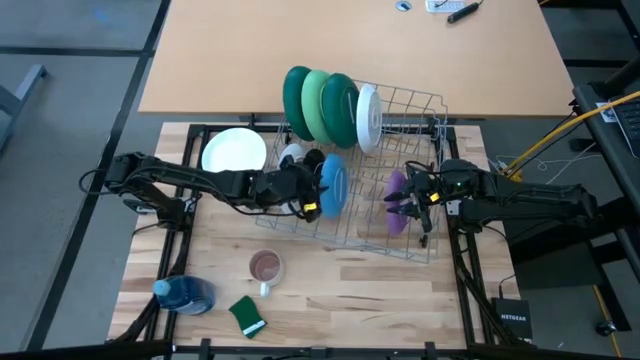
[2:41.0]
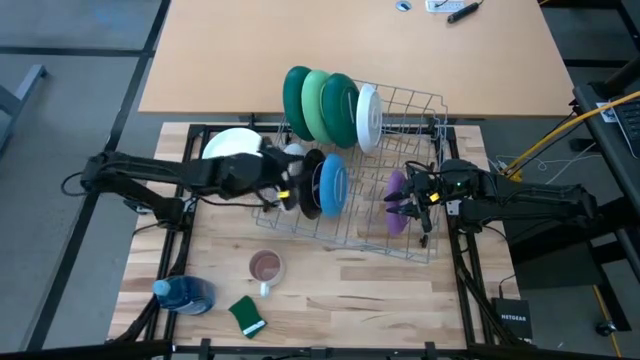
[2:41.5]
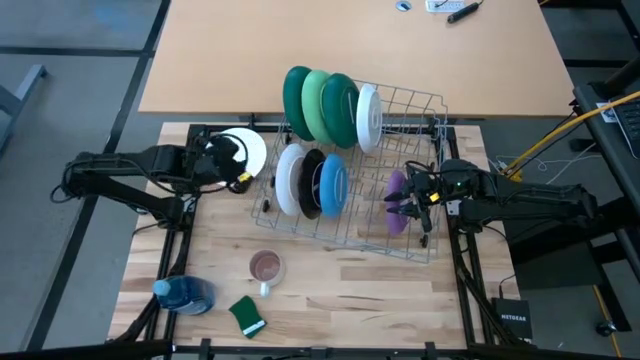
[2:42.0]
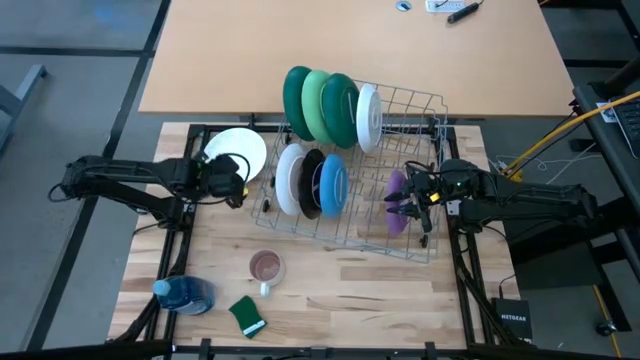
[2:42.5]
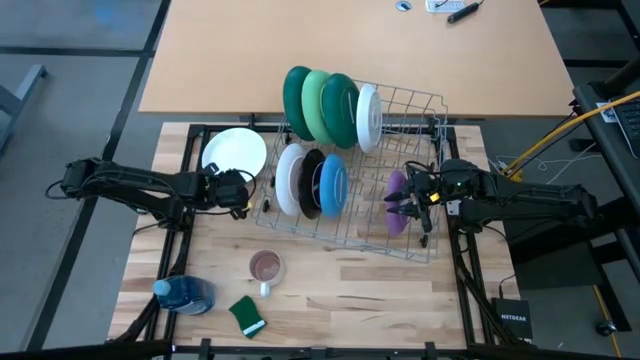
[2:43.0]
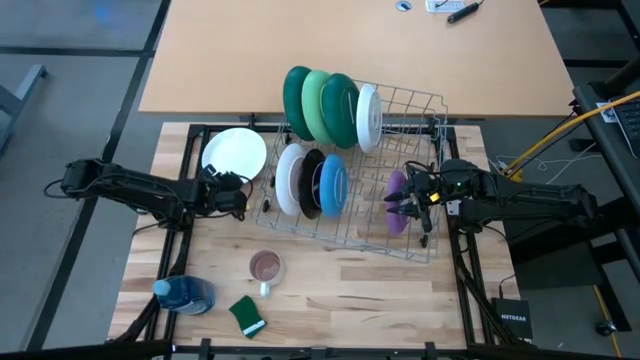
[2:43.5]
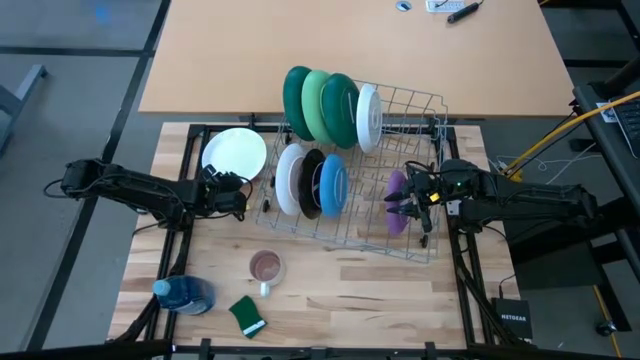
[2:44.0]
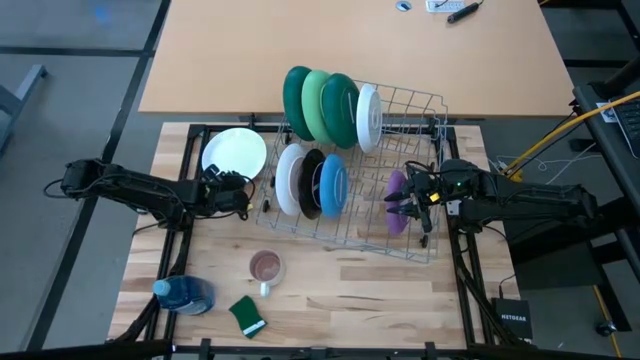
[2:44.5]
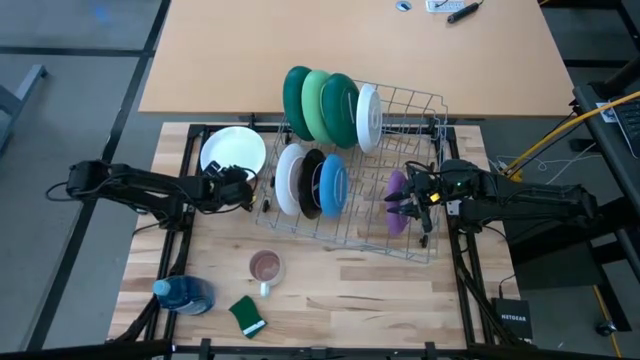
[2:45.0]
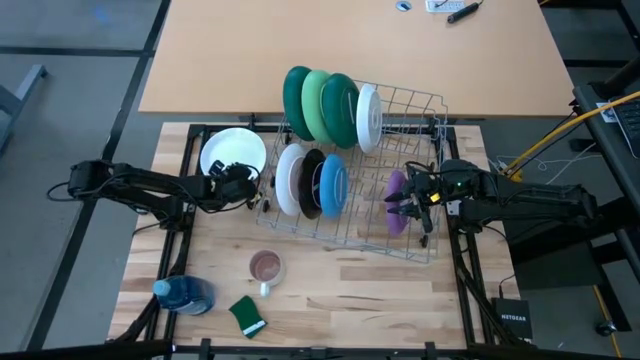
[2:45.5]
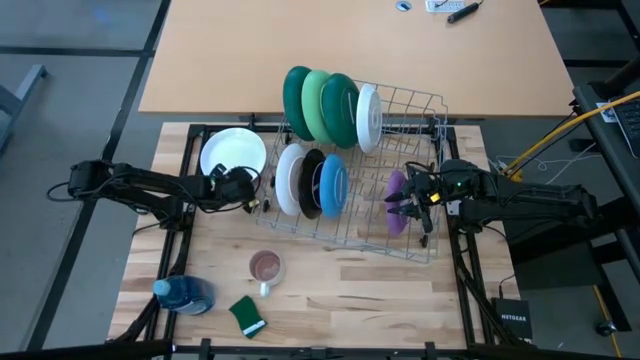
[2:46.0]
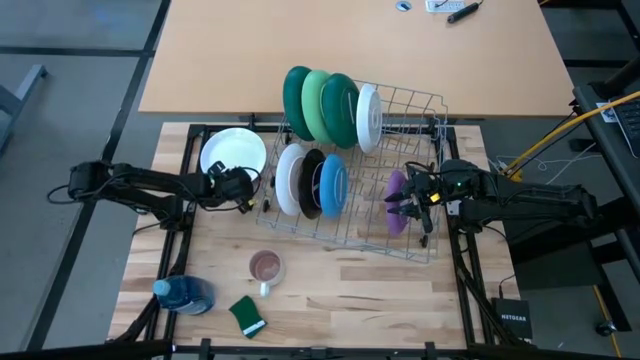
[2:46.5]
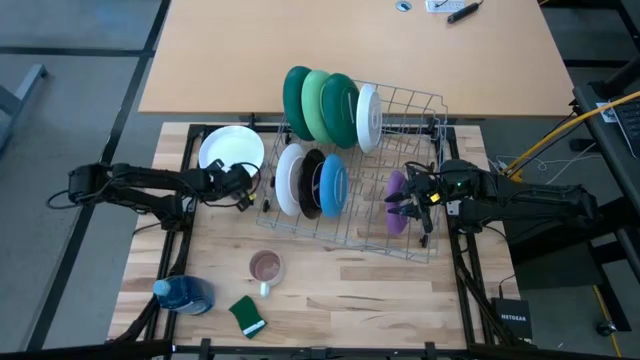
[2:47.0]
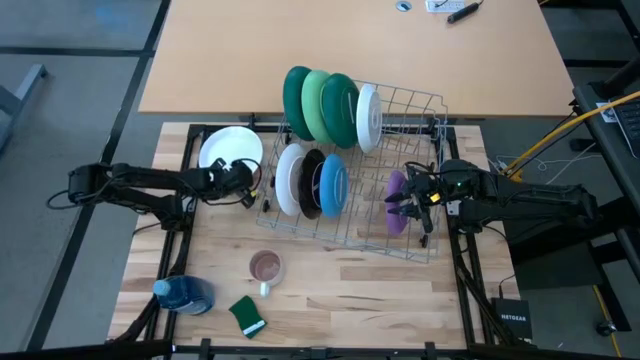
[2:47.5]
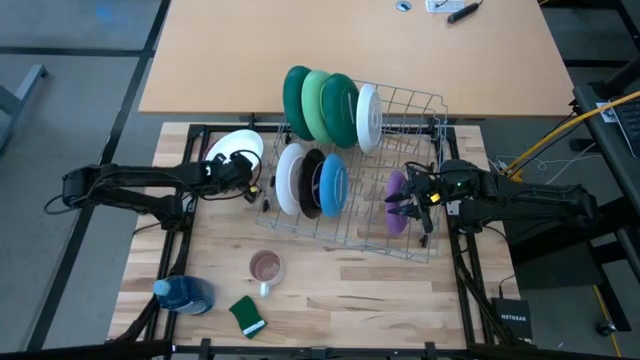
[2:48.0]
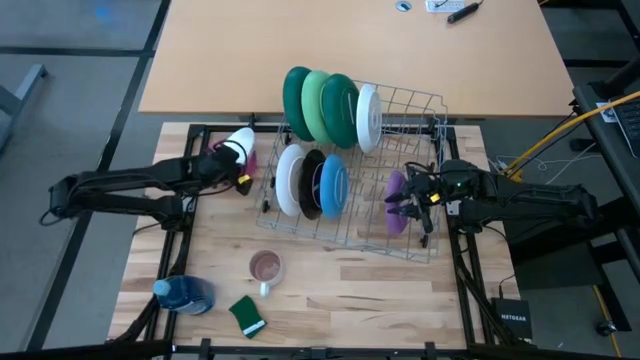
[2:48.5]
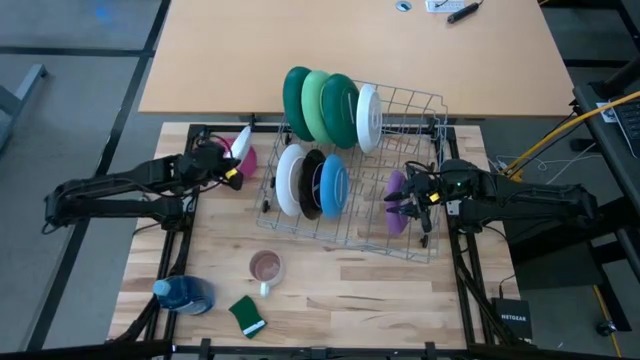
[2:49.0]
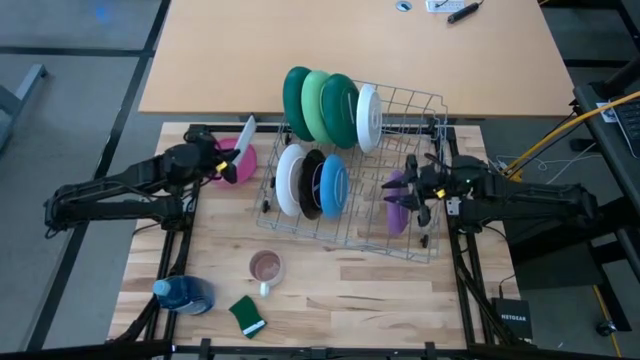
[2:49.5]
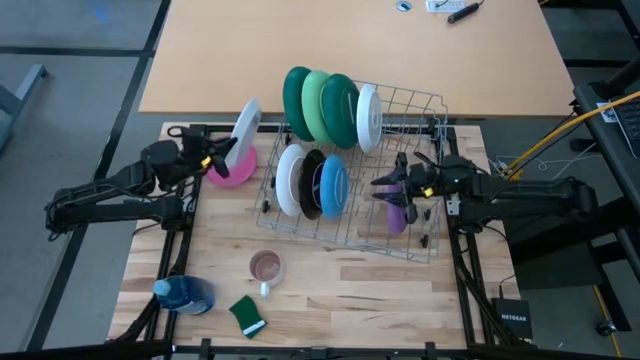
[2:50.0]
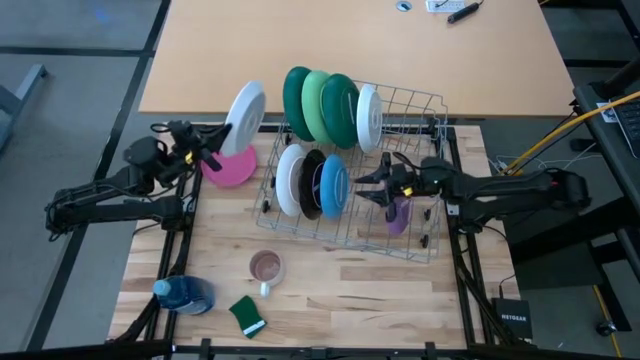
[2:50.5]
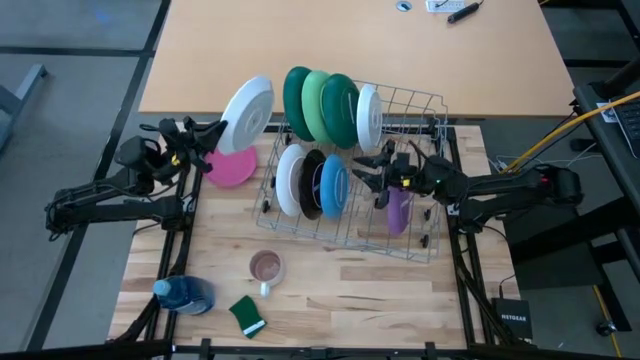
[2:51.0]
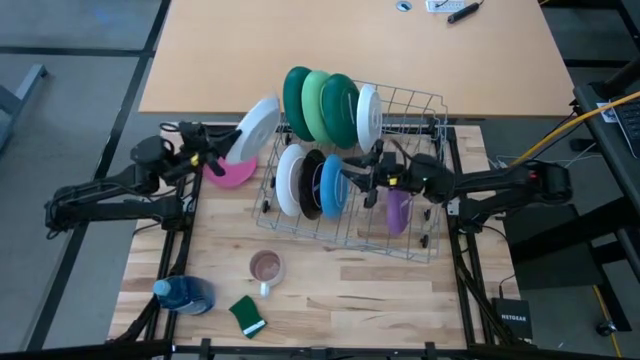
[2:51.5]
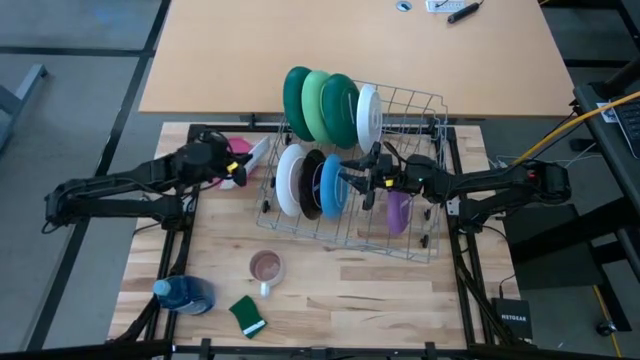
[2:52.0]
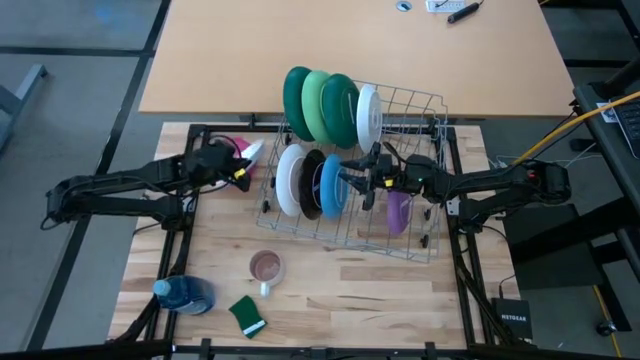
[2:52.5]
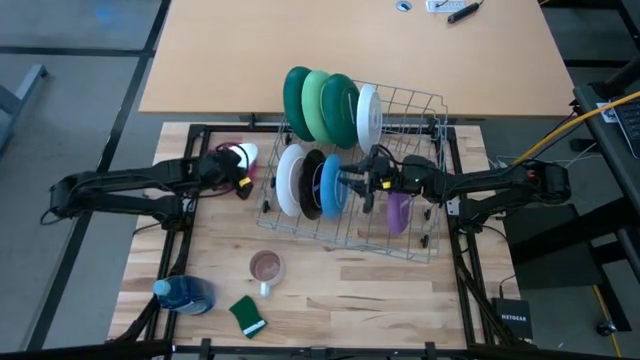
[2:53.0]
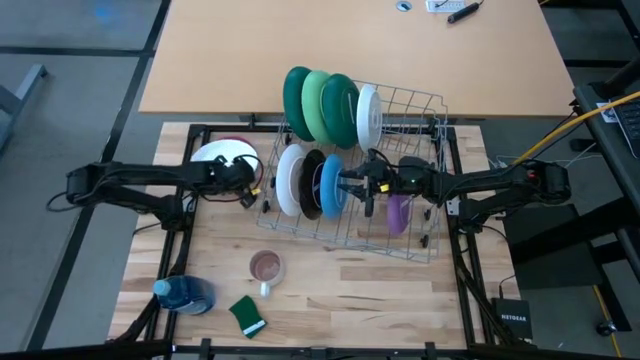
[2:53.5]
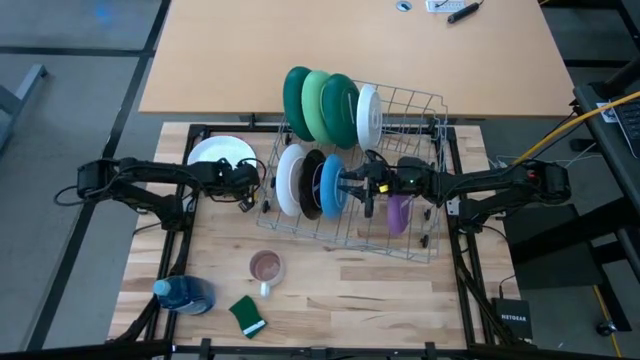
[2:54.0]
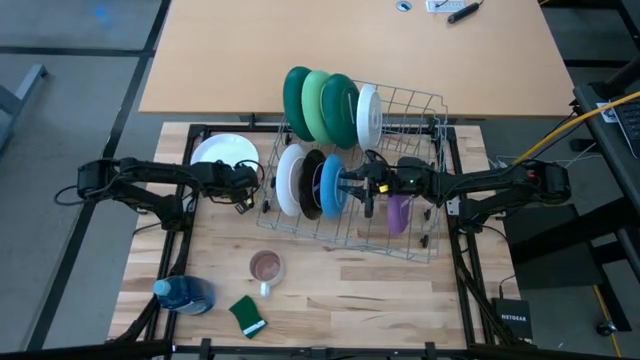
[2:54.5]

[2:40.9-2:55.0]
Task: Sort dishes
Put the white plate into the dishwasher rack

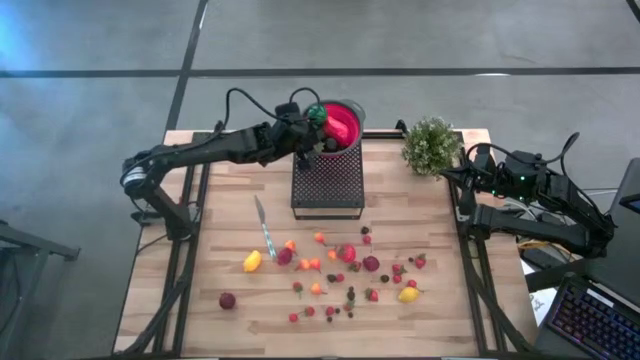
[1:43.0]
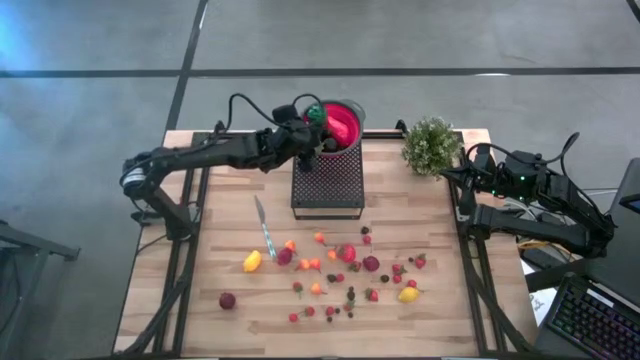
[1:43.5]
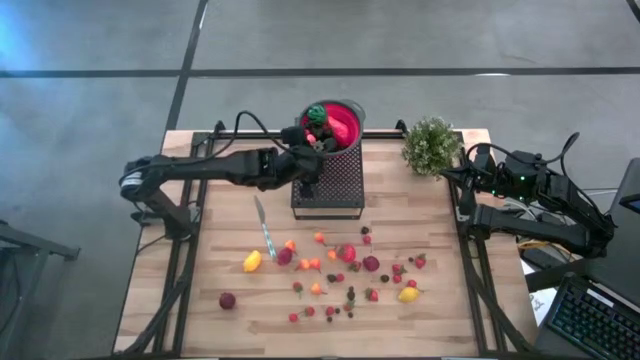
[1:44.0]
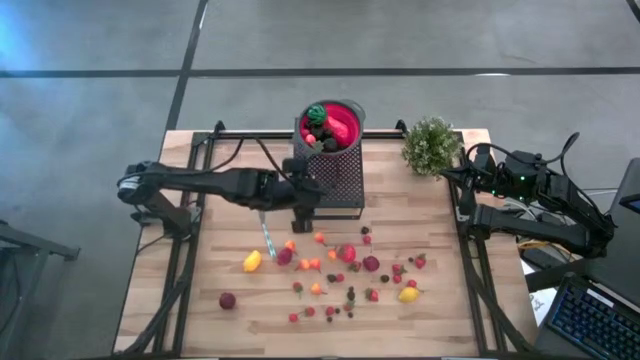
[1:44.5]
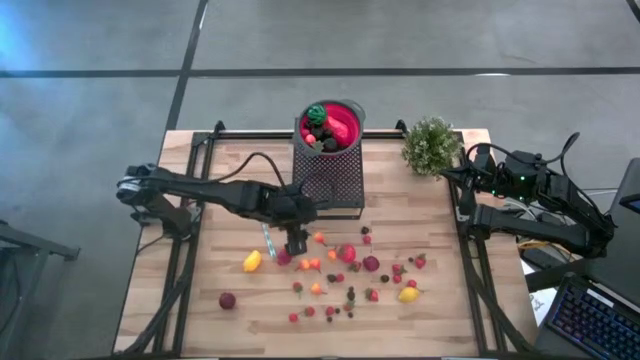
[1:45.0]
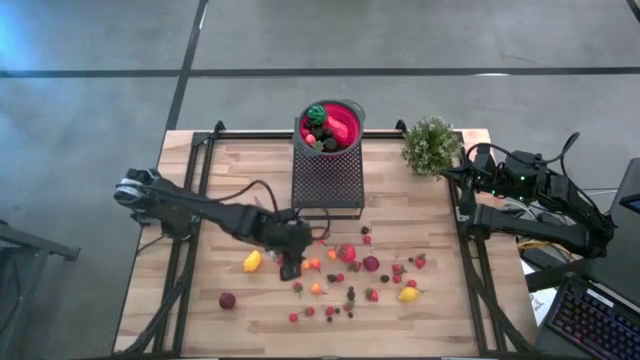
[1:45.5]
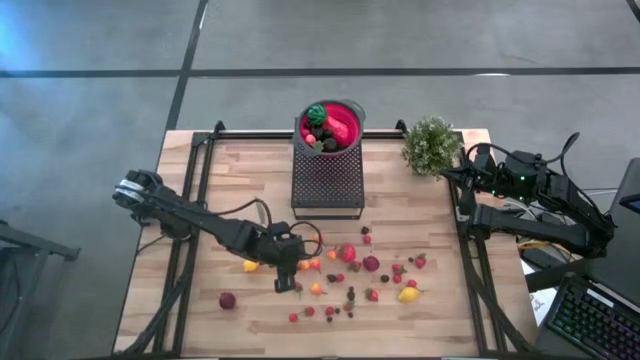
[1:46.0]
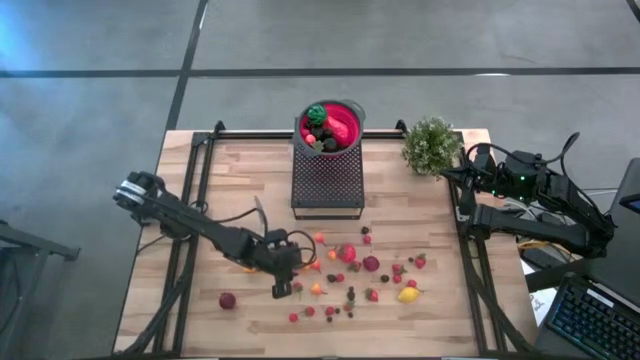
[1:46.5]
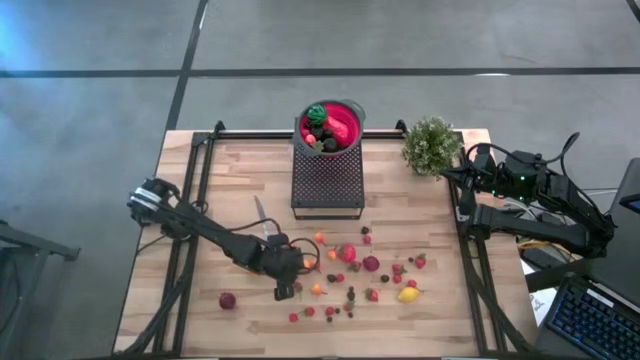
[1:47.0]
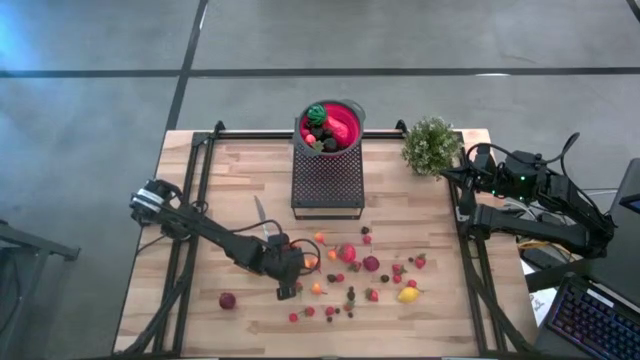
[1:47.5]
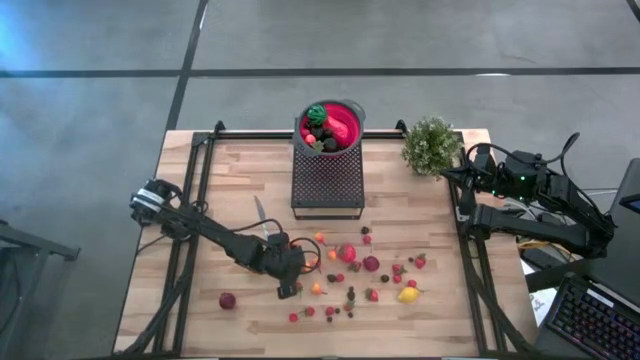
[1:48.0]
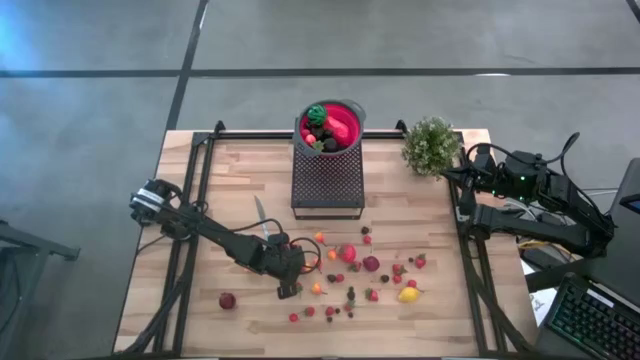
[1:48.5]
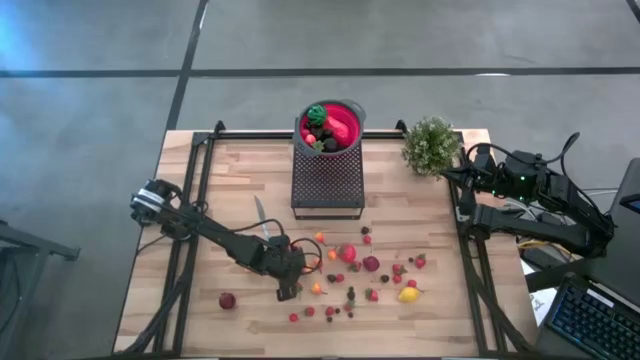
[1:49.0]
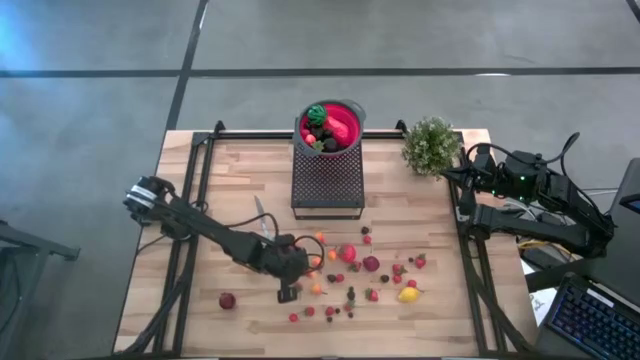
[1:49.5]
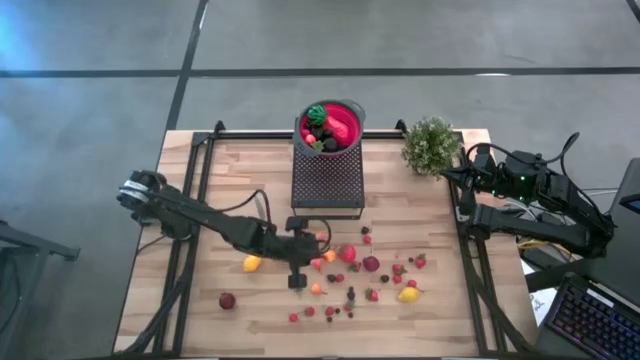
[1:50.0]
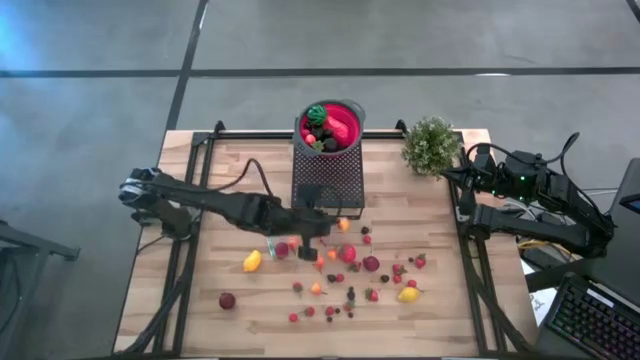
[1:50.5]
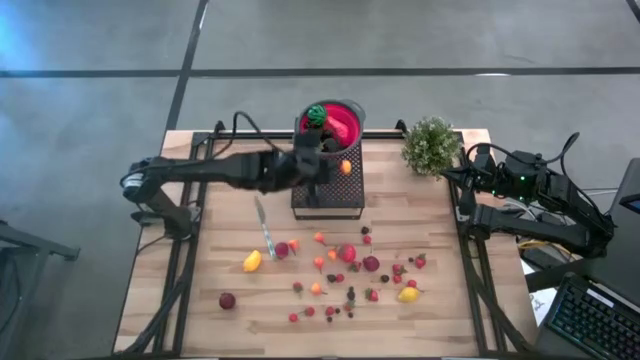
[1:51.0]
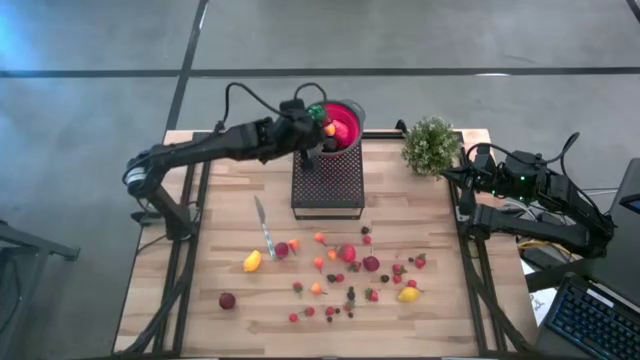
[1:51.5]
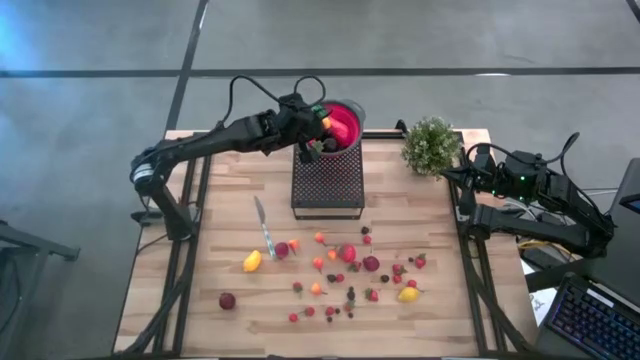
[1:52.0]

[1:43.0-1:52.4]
Task: Pick & Place Fruit
Put the pear into the strainer bowl on the shelf
